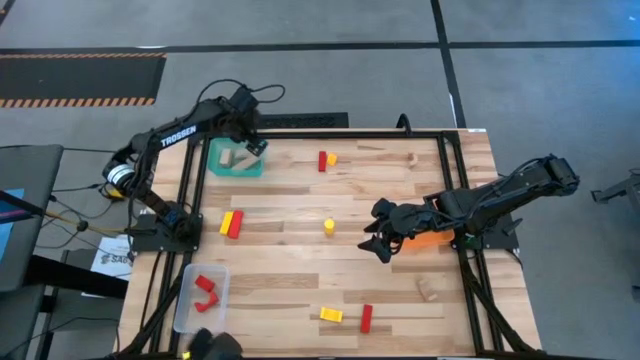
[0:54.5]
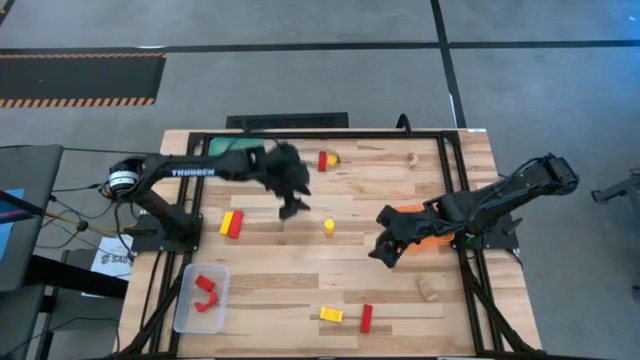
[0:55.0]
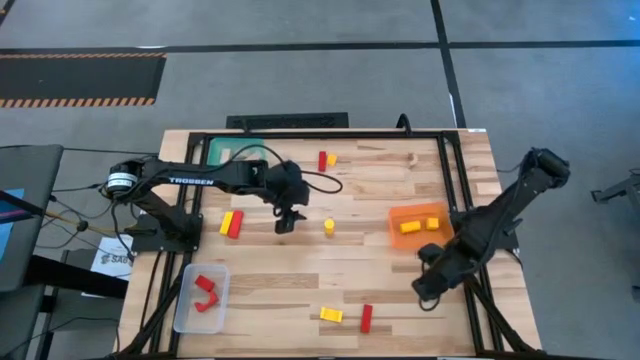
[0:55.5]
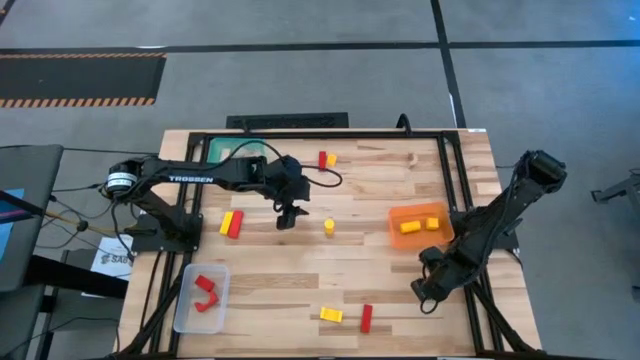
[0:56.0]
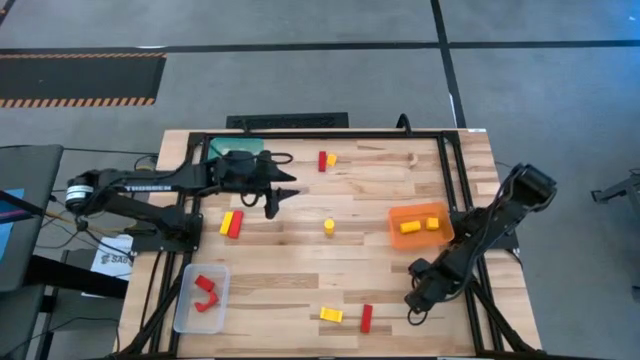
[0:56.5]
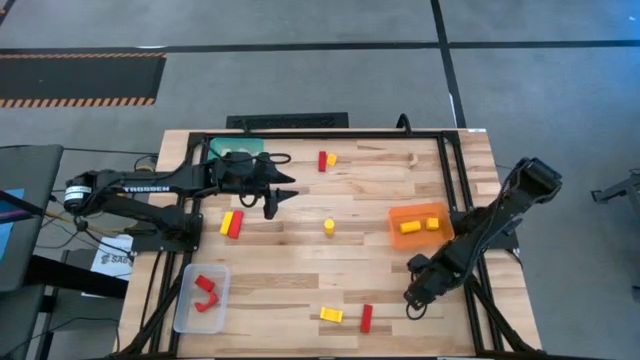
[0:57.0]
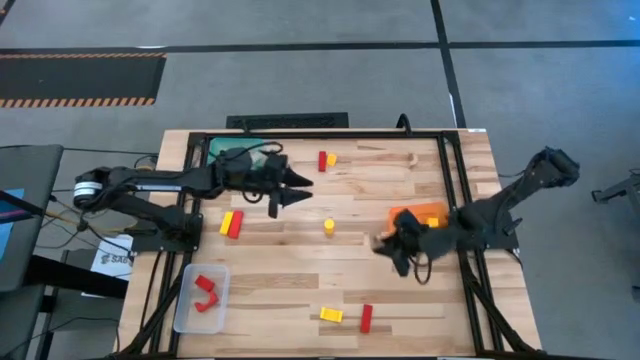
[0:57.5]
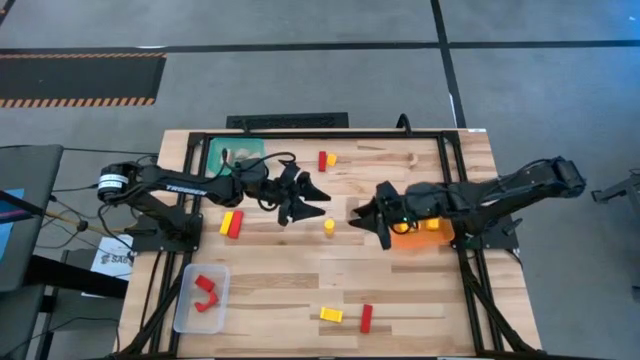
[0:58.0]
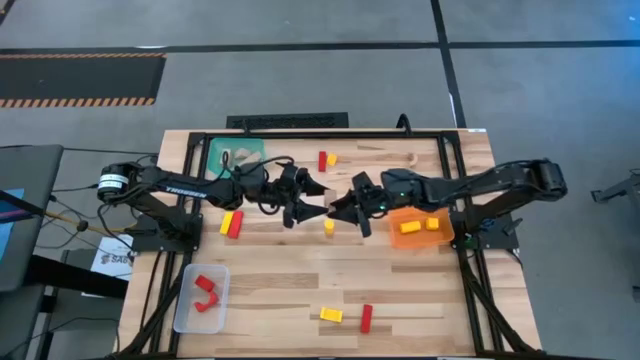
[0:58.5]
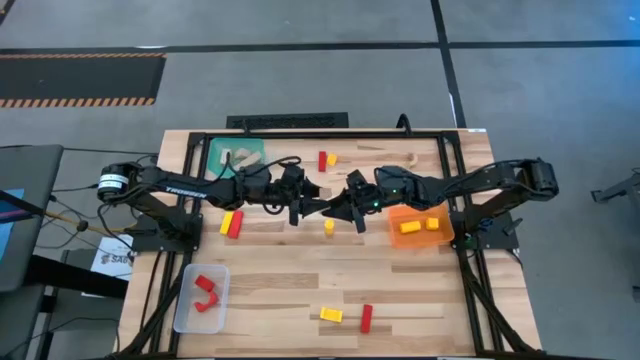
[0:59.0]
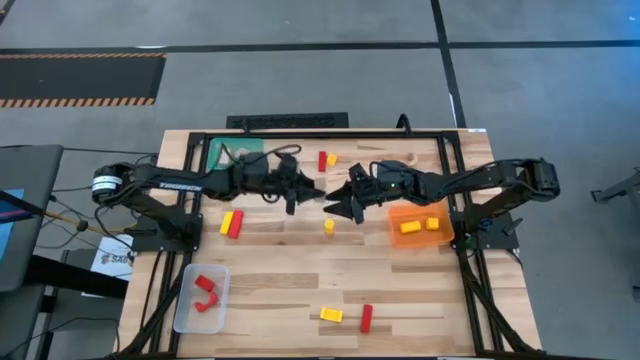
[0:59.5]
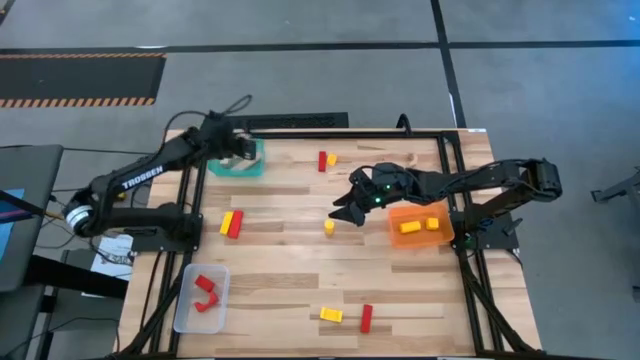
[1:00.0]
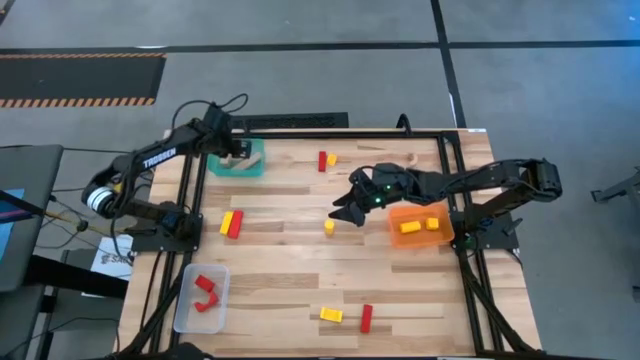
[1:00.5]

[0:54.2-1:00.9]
Task: Sort & place blocks by color
Put the light brown block into the light blue bin

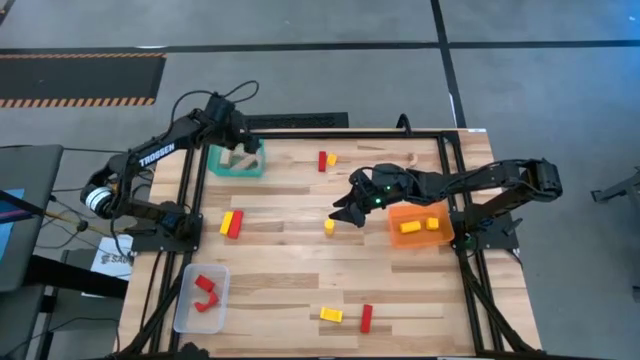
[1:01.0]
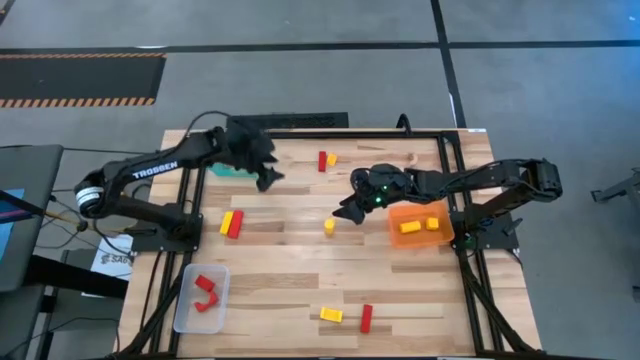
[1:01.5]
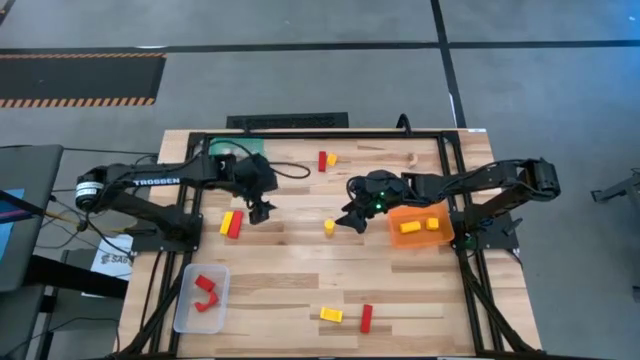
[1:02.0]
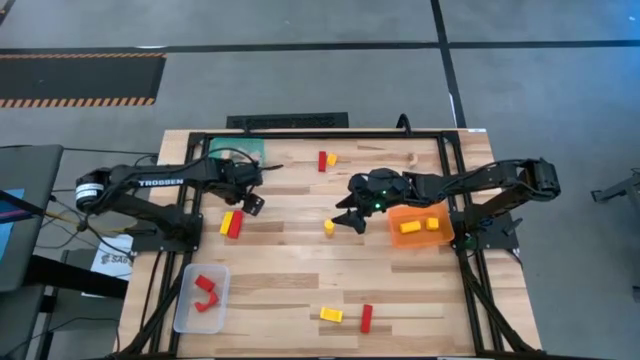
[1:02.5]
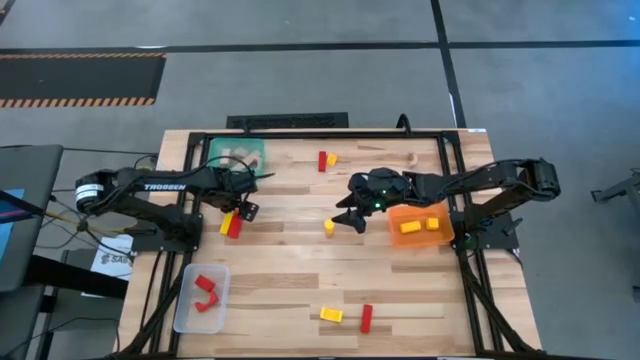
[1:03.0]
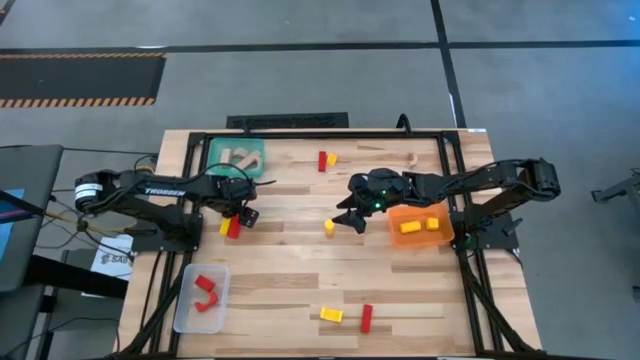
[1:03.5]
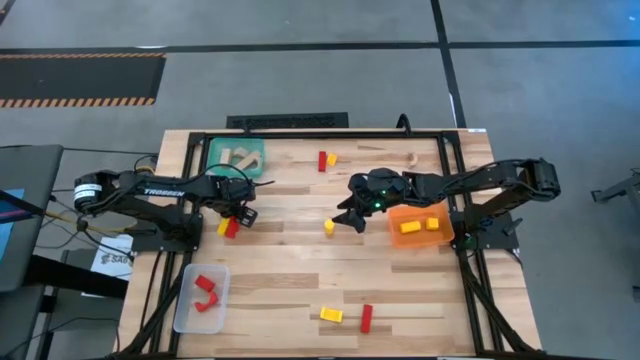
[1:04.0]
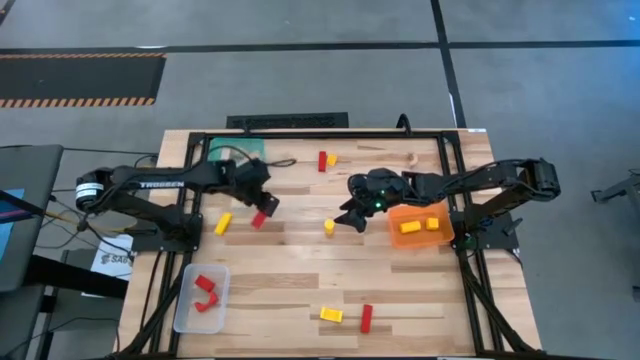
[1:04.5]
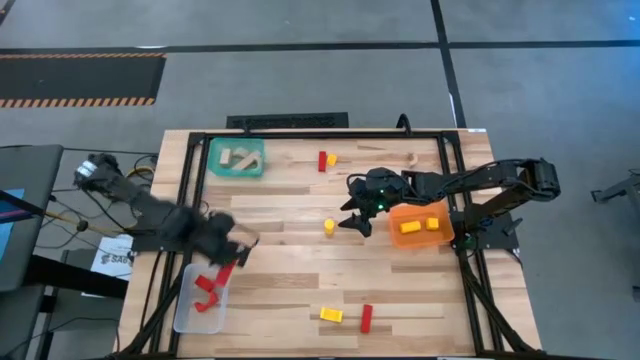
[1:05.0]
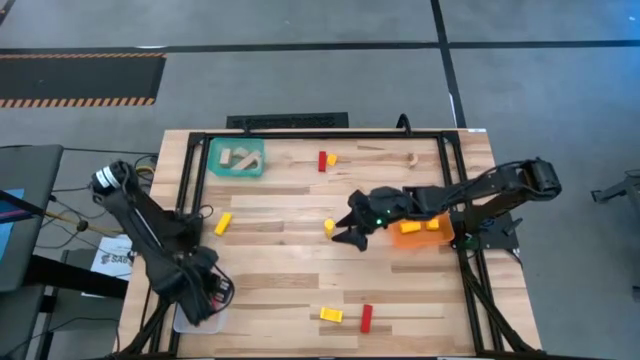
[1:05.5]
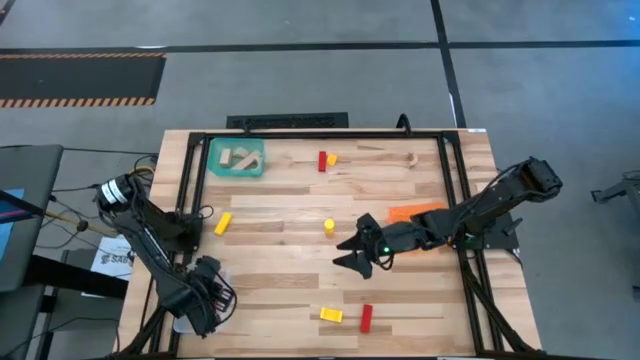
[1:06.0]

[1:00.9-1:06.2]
Put the red block into the transparent bin

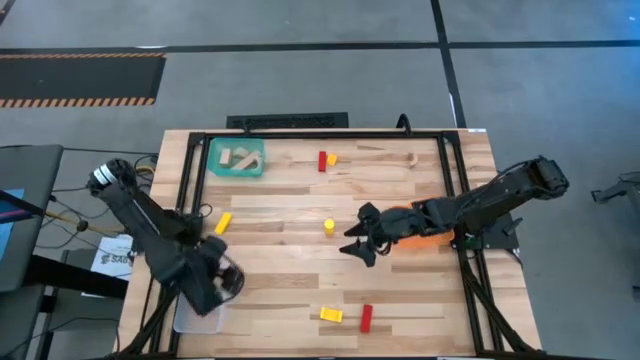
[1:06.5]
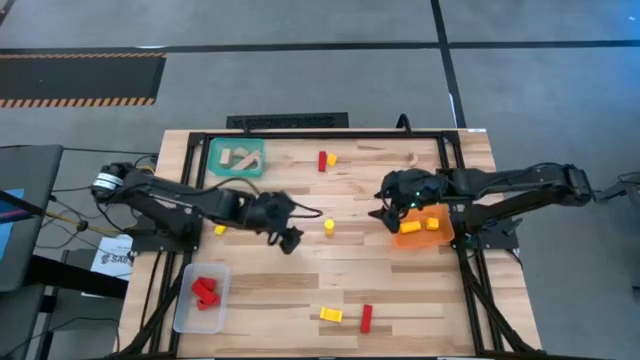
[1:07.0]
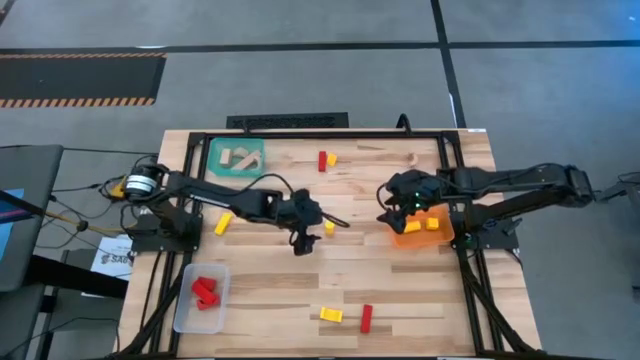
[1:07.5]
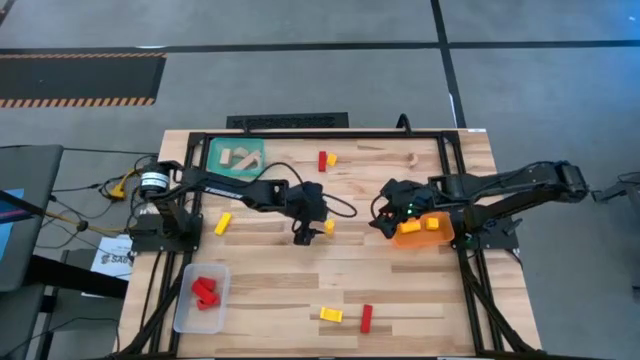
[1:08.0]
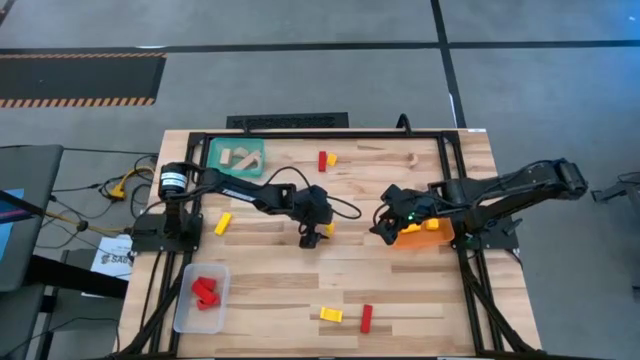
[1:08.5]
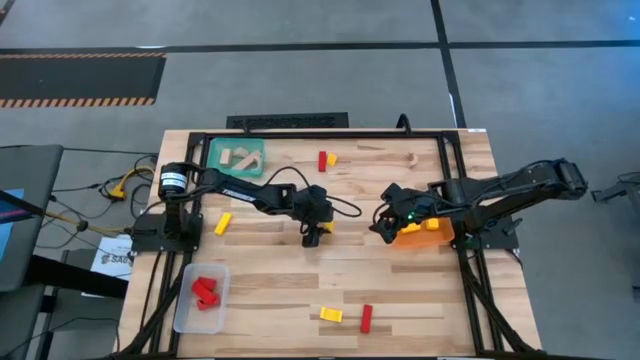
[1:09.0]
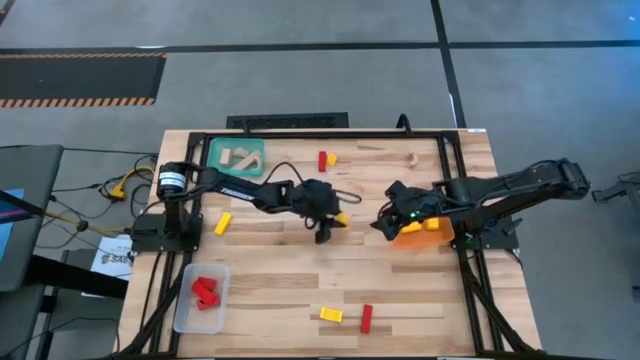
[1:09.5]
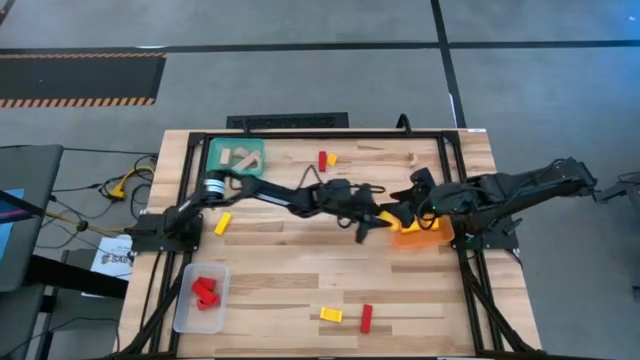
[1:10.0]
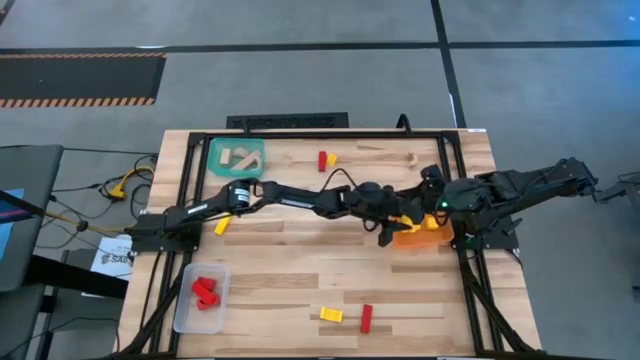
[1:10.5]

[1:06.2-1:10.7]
Put the yellow block into the orange bin

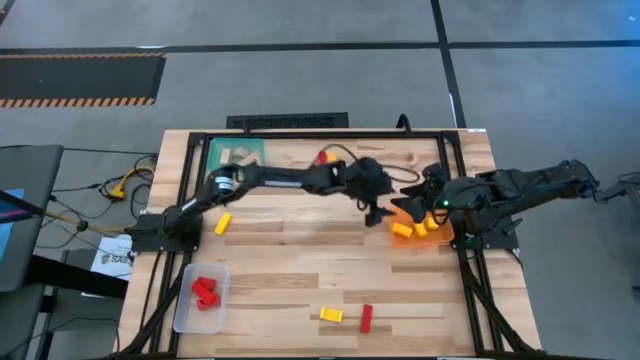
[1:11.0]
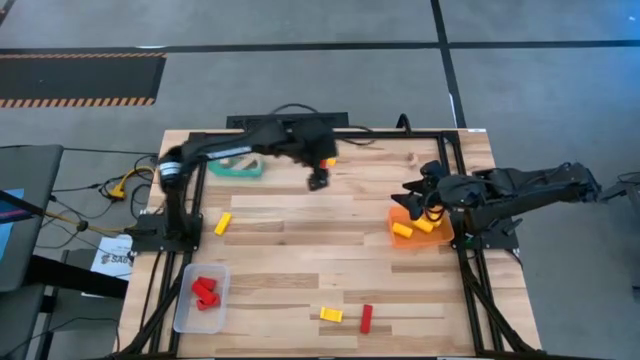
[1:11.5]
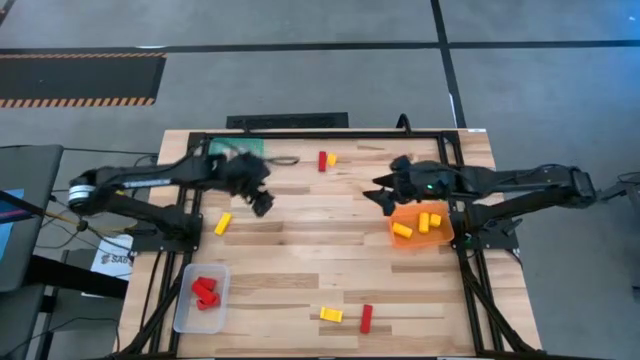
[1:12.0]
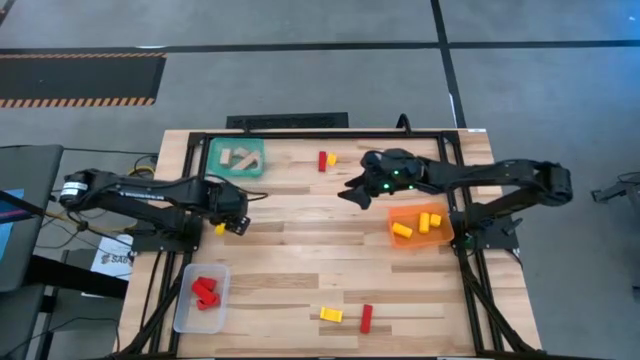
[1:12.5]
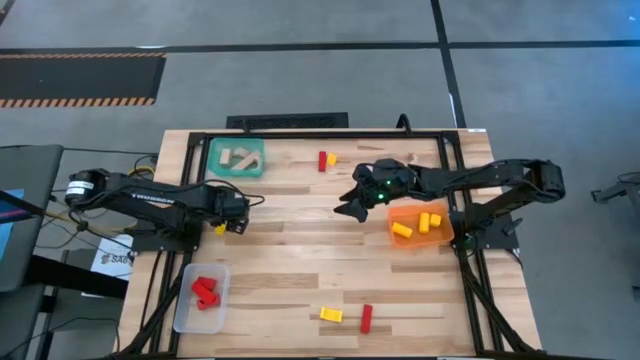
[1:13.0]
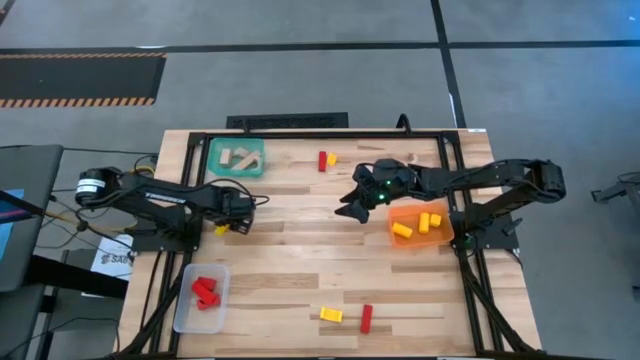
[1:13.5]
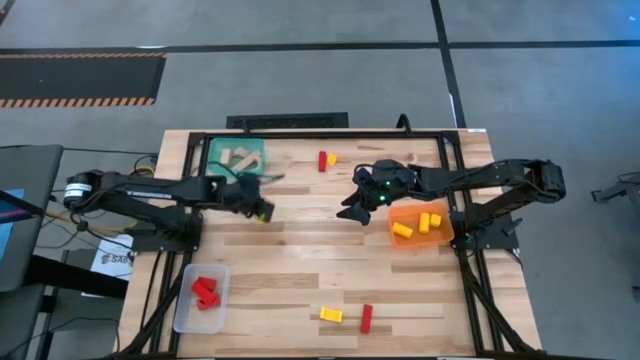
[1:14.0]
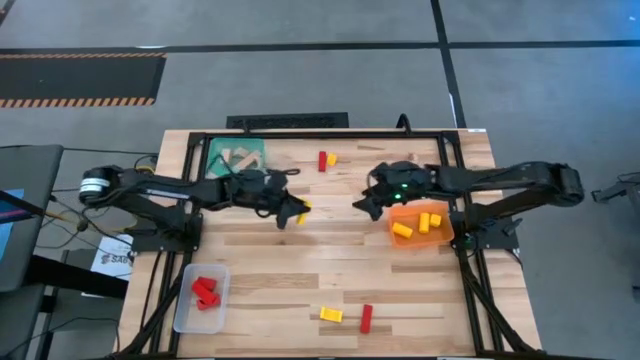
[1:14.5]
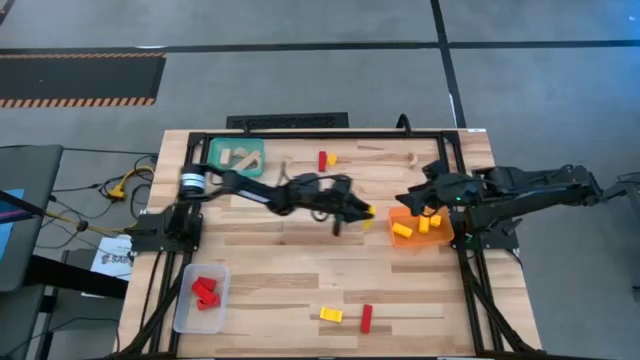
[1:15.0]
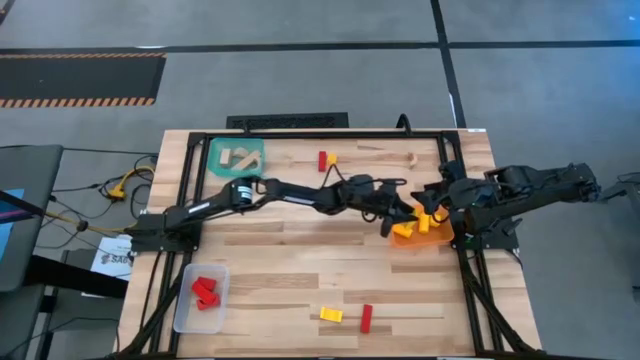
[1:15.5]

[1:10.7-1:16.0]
Put the yellow block into the orange bin

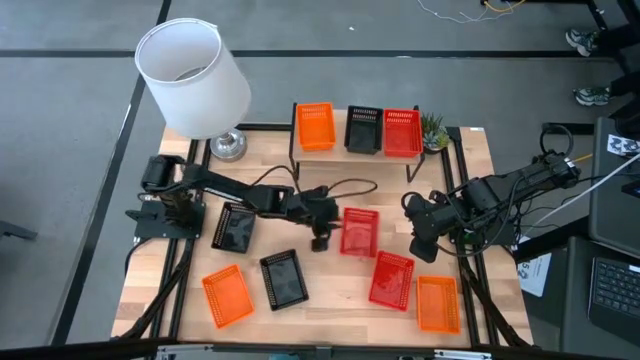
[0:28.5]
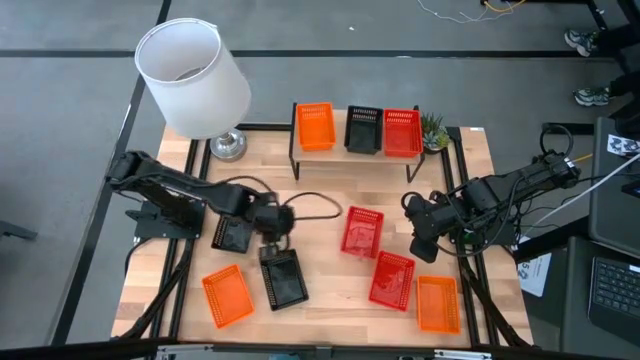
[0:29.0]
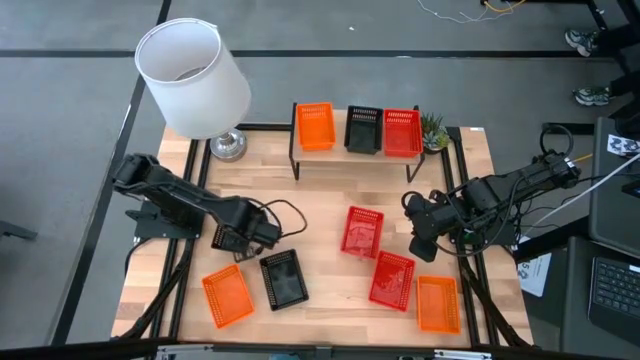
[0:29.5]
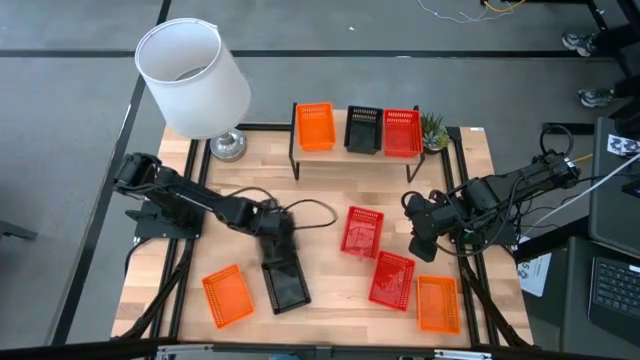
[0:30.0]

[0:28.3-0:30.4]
Task: Stack baskets on shelf by color
Move the left black basket to the middle of the table
